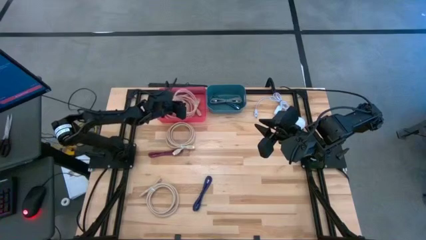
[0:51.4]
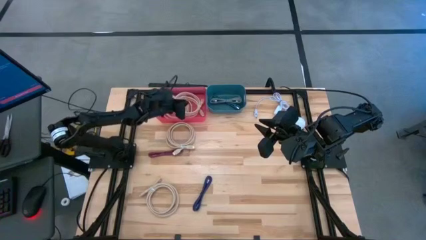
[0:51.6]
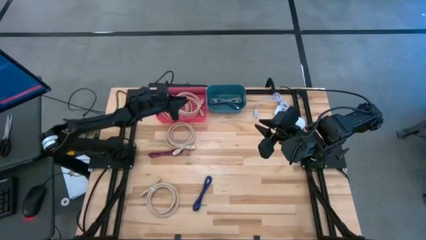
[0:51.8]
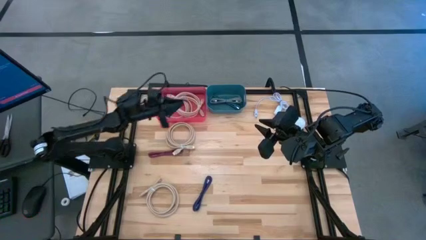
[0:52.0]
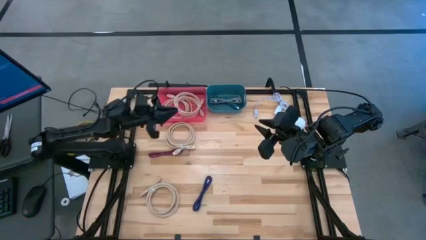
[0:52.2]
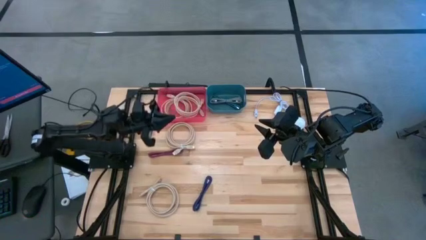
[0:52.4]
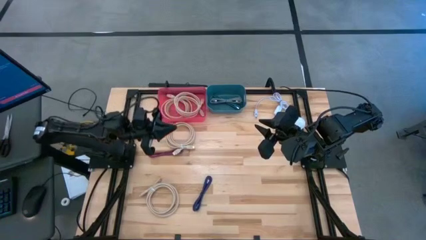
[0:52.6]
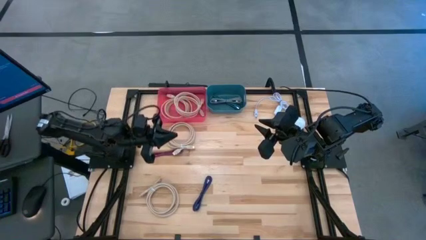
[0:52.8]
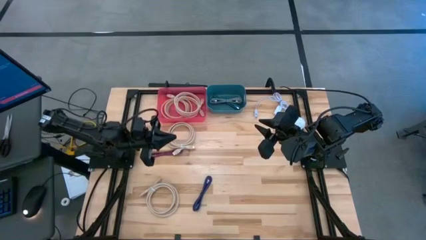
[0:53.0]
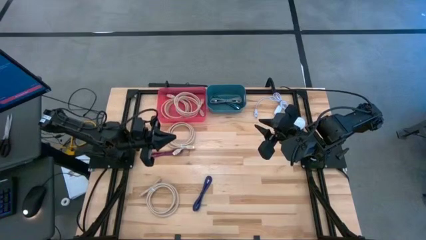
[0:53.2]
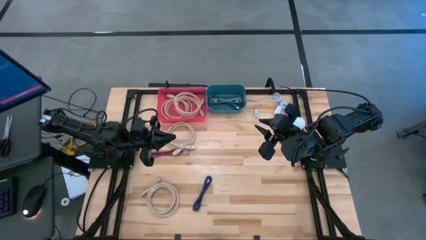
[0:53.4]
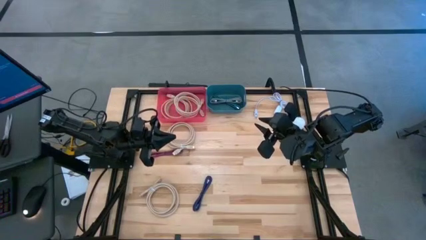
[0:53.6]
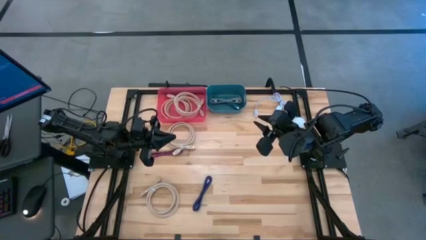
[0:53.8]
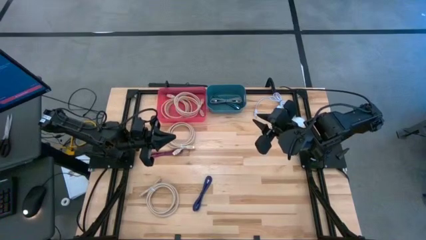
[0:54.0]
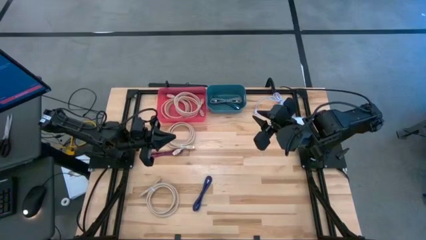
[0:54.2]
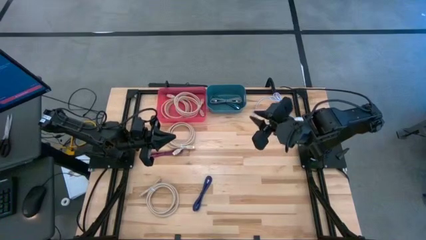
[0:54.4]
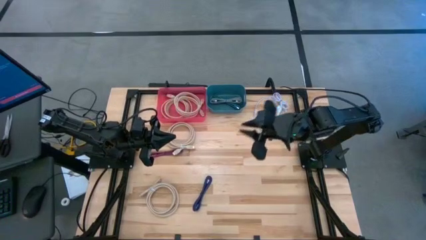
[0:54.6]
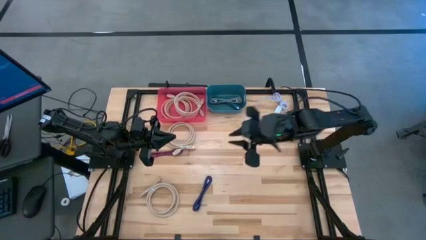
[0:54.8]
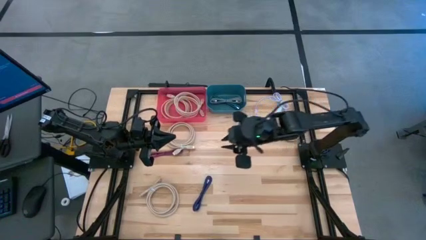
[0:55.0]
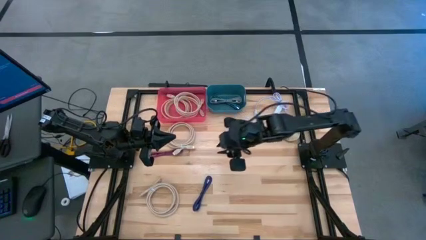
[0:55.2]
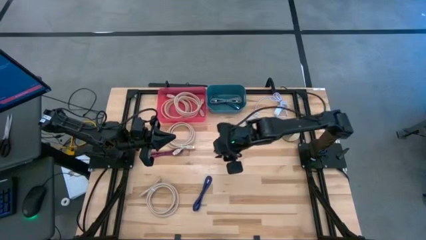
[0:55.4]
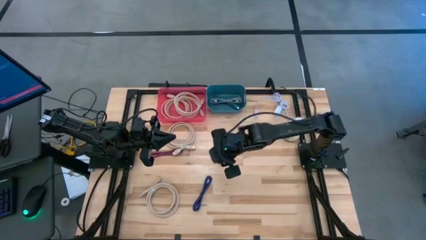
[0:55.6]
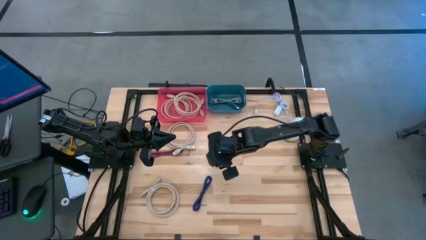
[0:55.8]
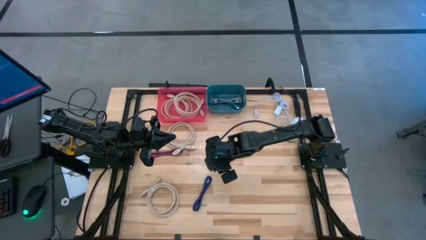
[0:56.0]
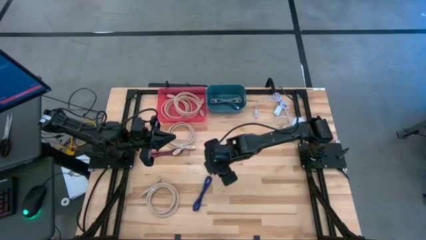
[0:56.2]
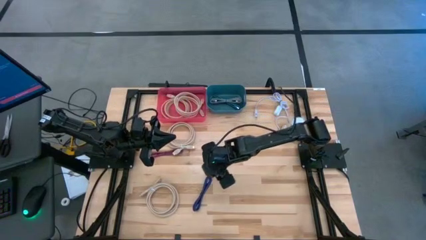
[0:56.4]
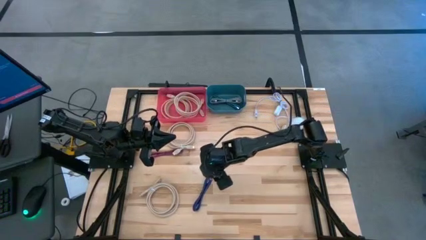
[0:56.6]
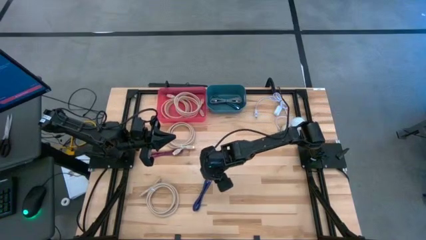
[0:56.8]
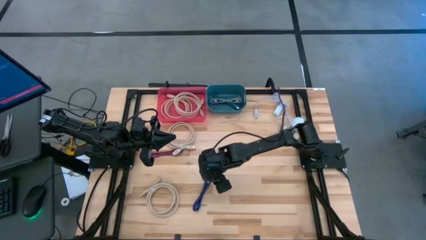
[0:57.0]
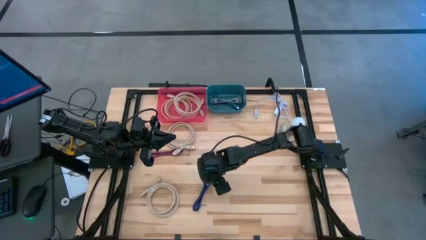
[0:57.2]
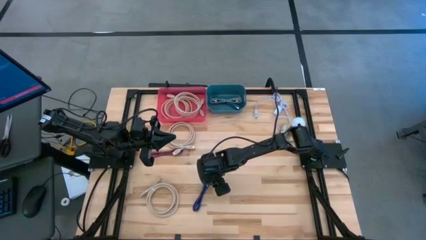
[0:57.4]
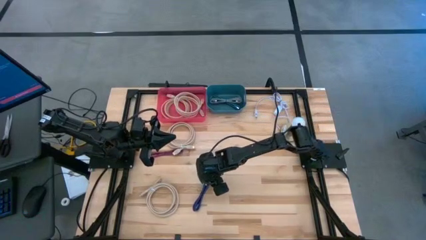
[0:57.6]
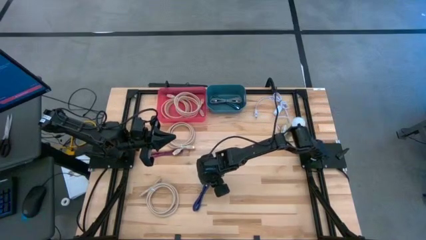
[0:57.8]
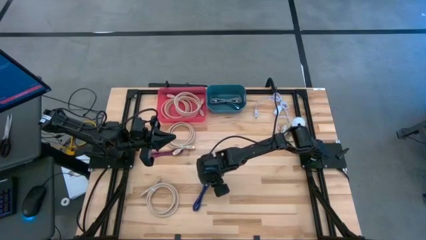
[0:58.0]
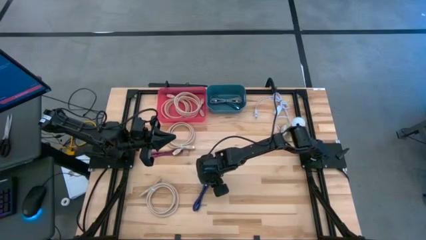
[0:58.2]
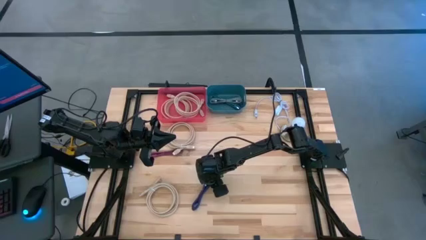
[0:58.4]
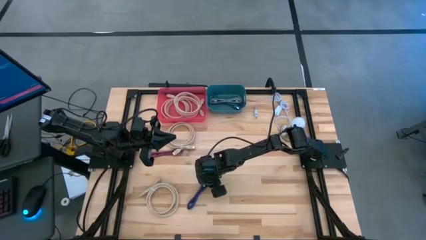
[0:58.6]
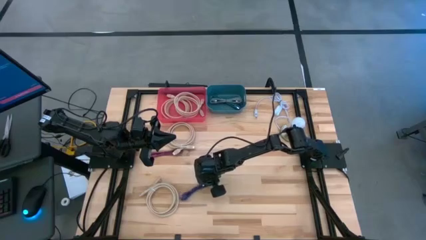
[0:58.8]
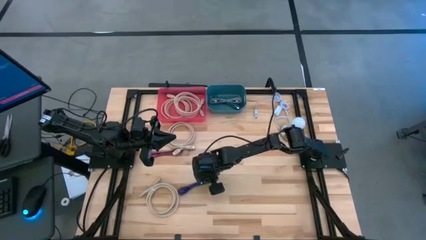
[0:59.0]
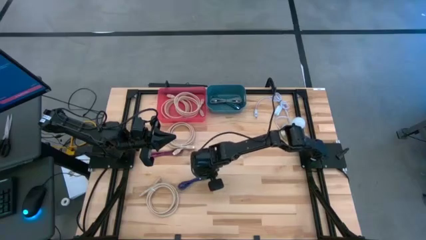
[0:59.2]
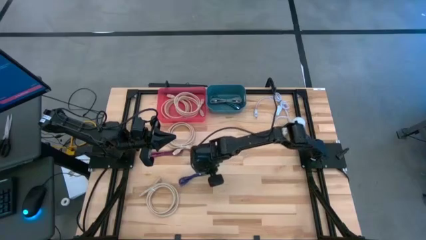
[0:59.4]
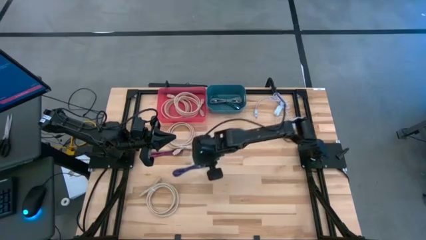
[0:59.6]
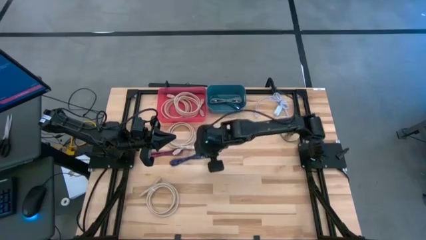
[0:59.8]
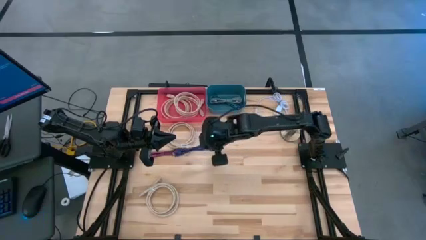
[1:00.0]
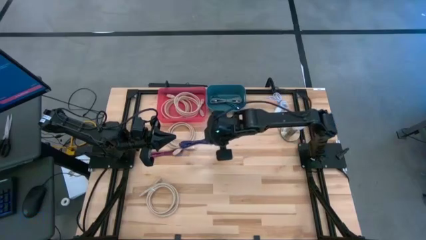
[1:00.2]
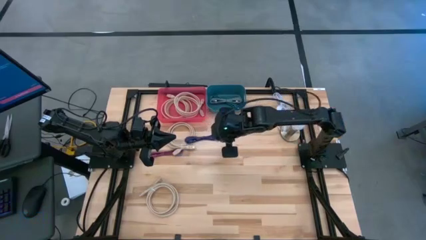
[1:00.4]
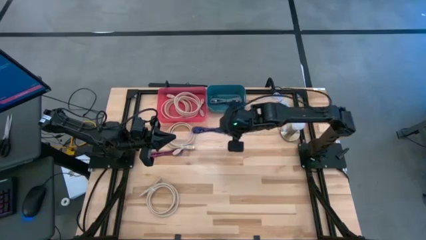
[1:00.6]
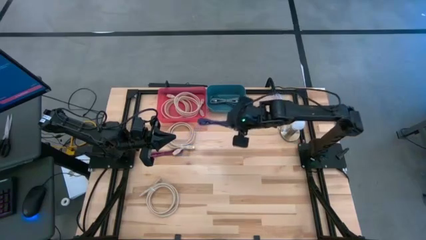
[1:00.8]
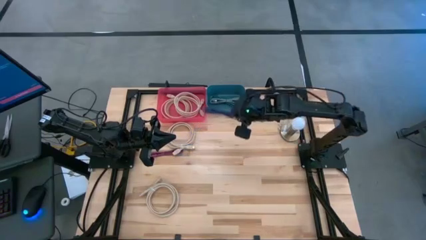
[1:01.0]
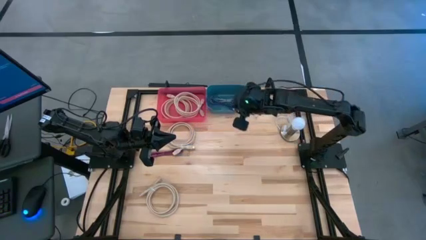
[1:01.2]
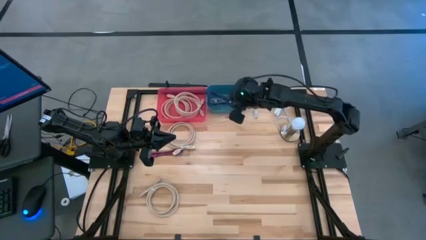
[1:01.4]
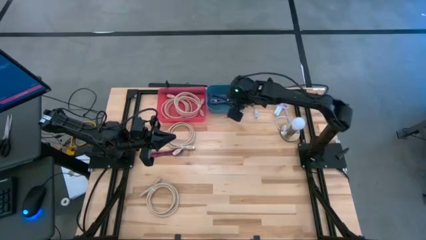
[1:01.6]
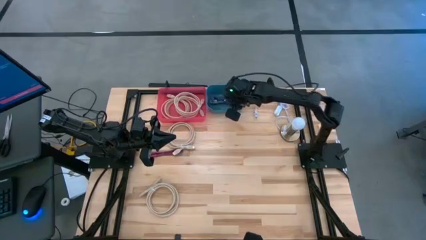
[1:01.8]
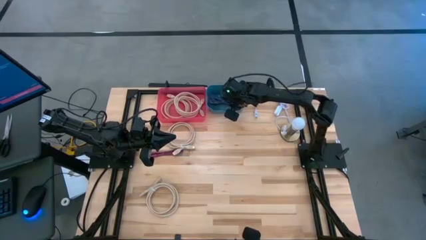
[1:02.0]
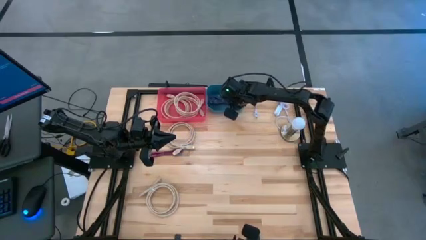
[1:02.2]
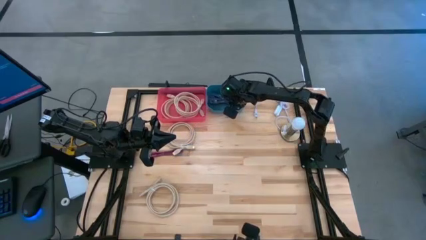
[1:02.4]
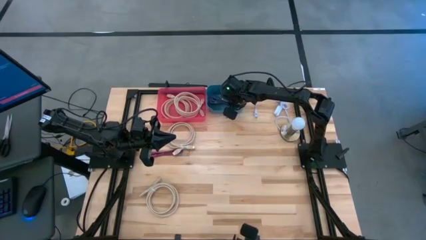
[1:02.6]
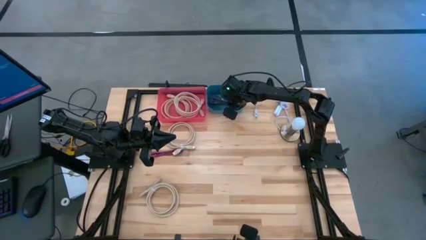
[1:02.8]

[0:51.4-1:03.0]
Task: Pick & Place USB Port
Put the black blue charger cable into the blue bin

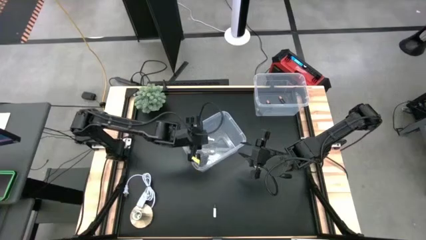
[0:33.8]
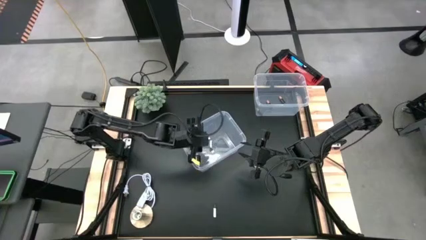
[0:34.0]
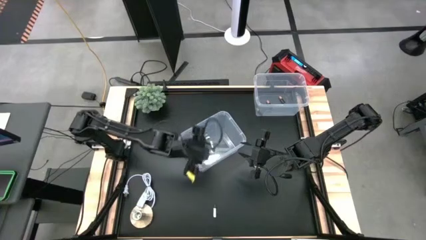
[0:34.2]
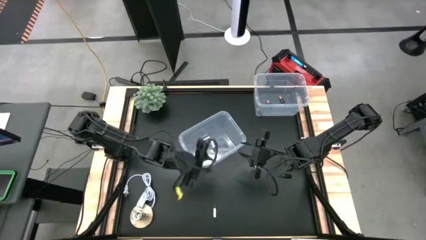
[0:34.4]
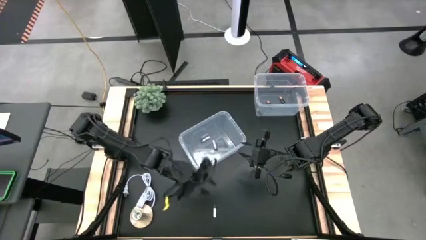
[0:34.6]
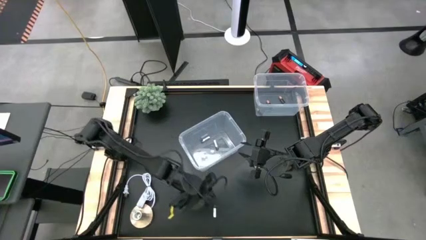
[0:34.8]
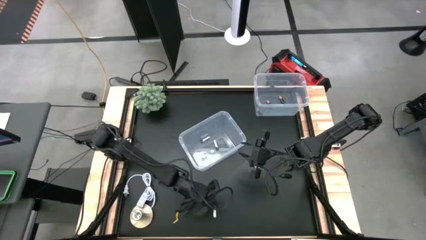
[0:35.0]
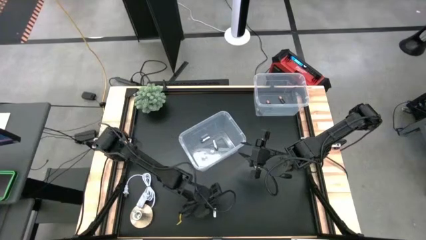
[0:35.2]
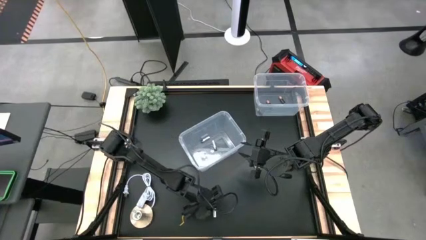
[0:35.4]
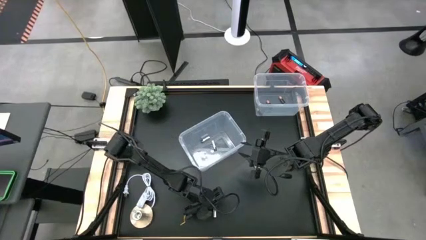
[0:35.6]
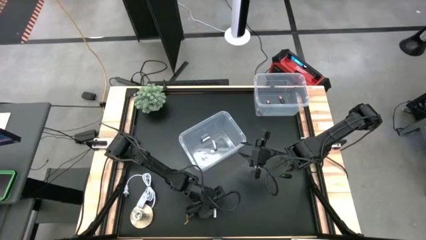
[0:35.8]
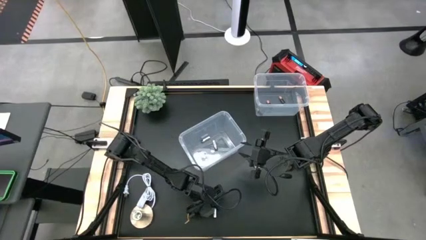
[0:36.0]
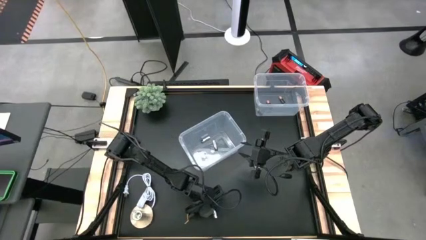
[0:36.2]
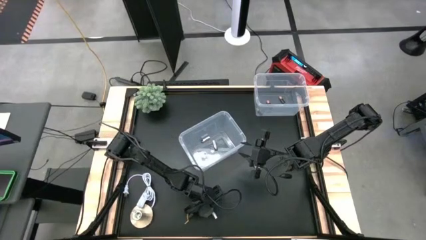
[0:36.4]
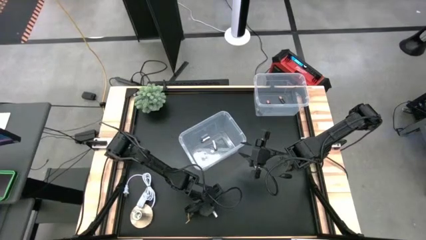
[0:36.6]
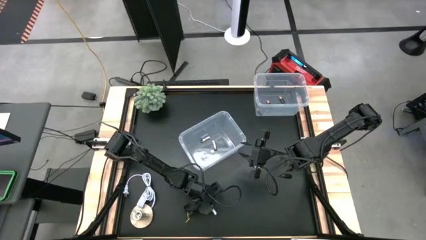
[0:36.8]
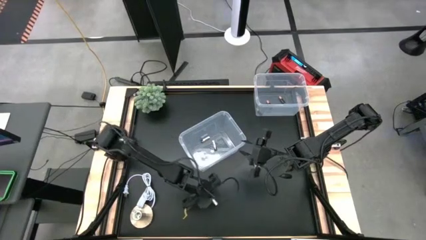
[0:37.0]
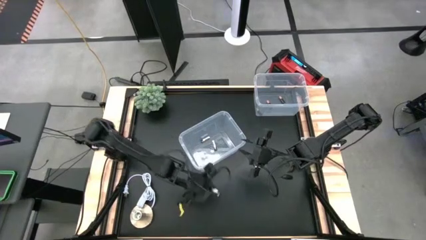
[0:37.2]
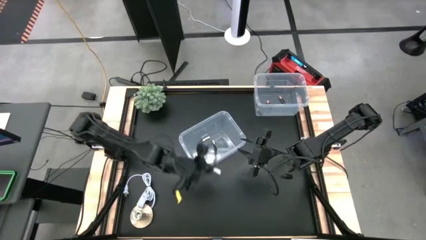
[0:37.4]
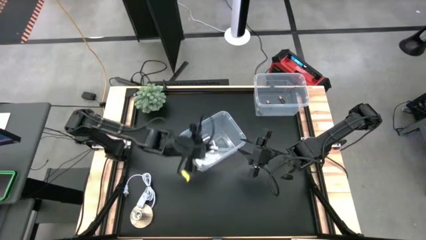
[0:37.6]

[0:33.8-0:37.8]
Task: Sort batteries
Put the silver battery into the bottom transparent bin
